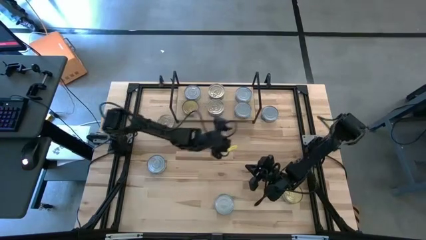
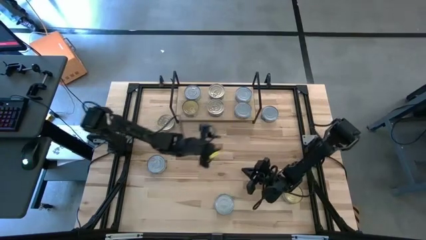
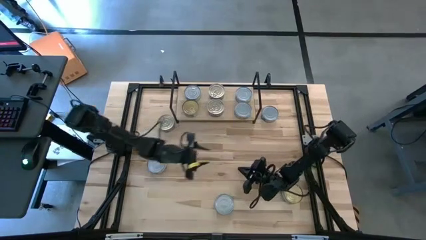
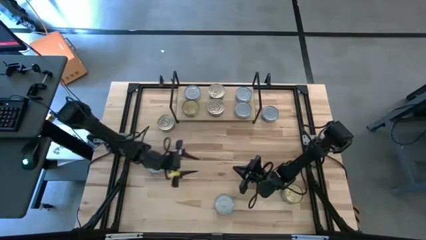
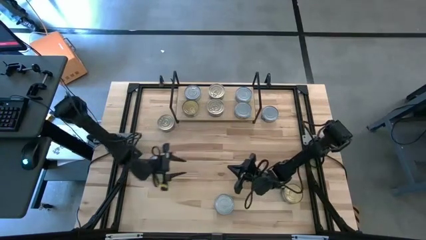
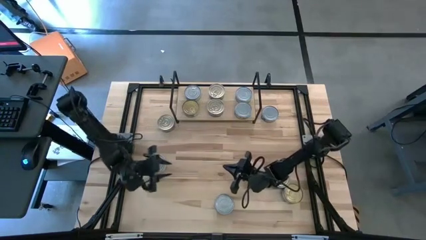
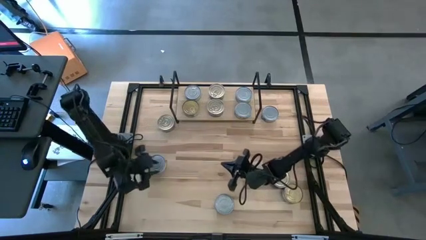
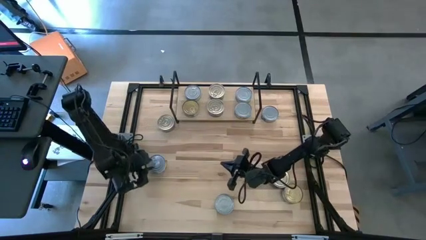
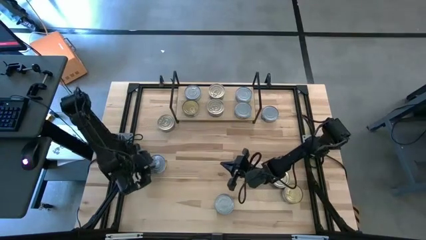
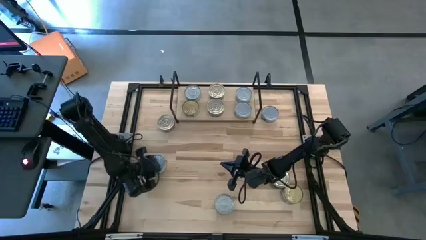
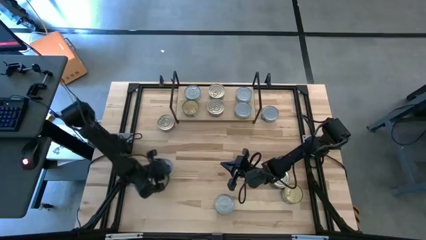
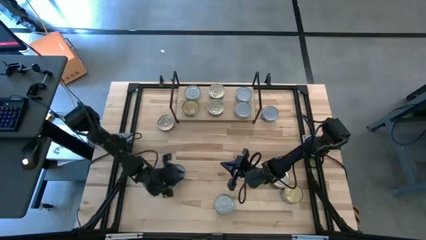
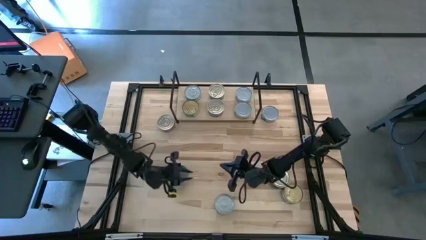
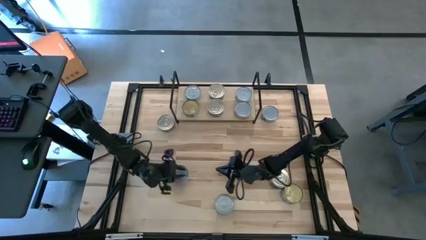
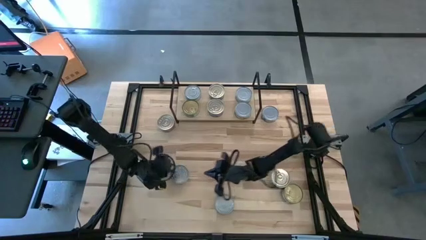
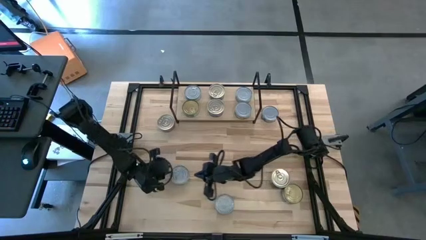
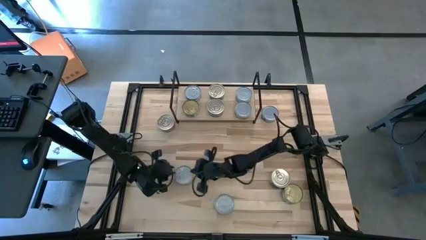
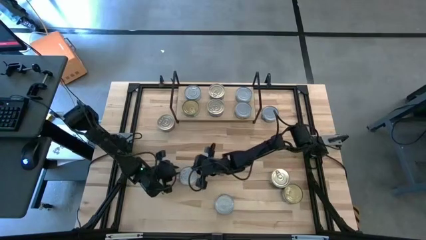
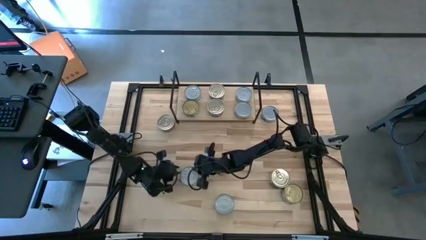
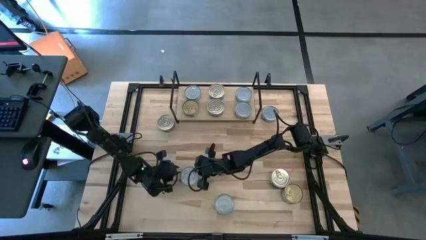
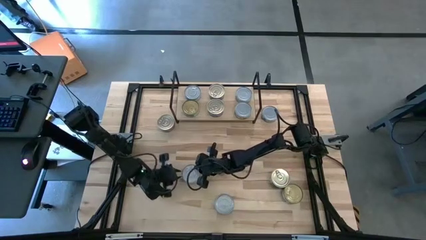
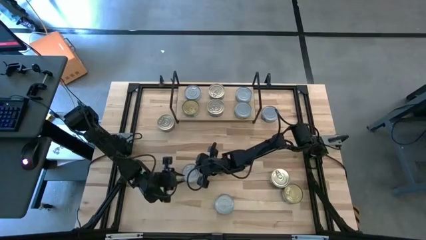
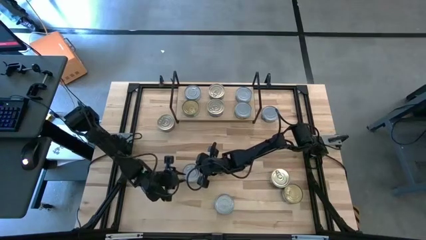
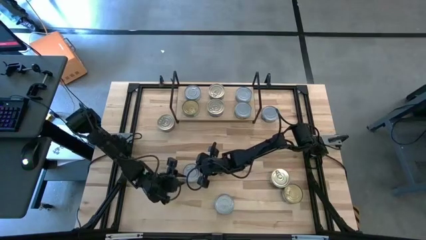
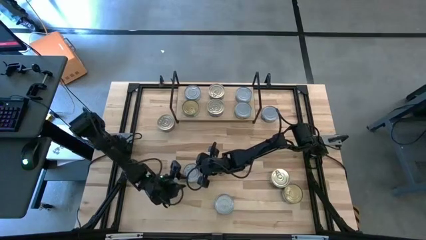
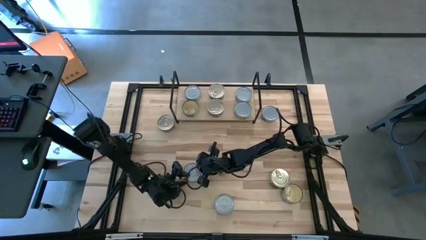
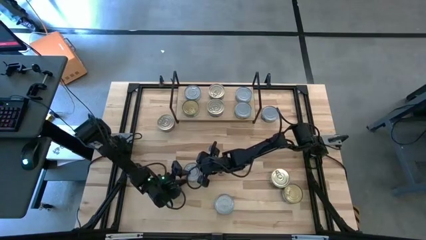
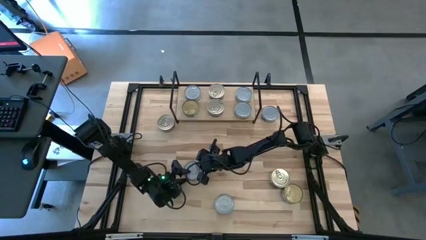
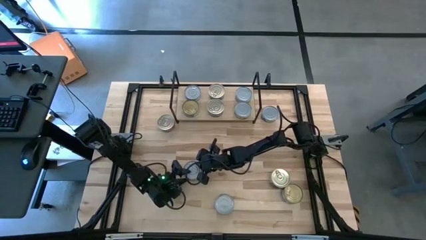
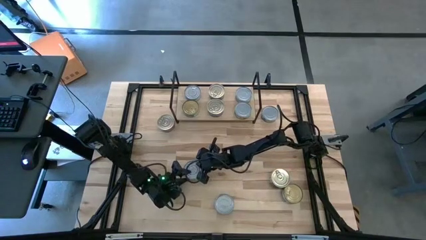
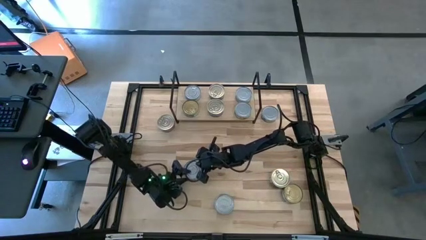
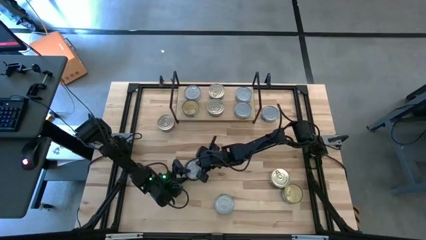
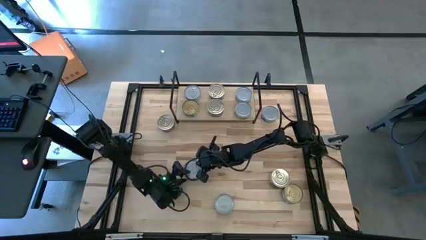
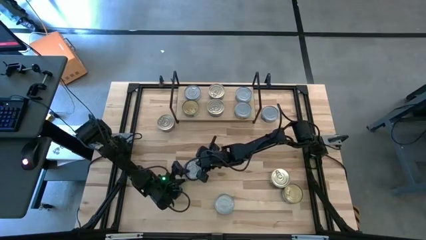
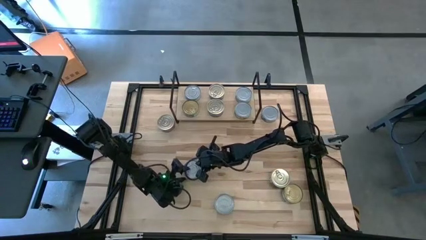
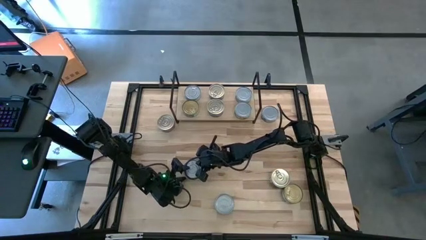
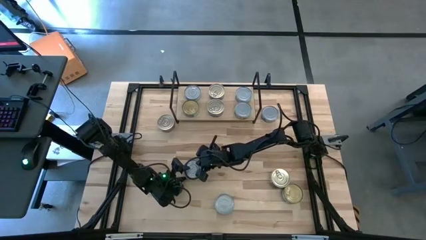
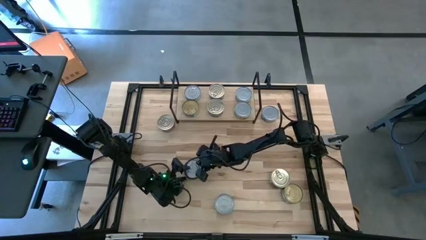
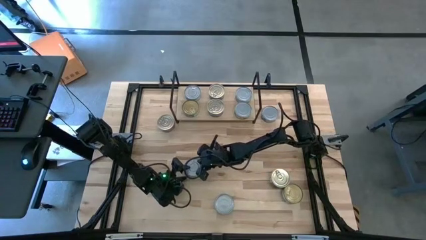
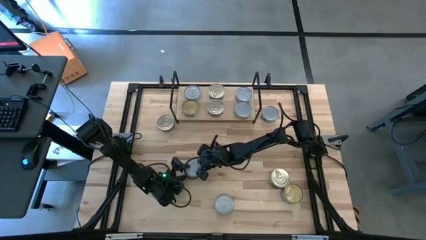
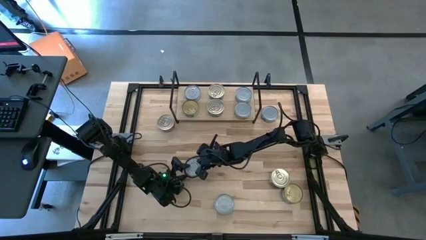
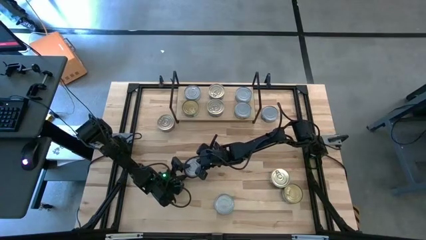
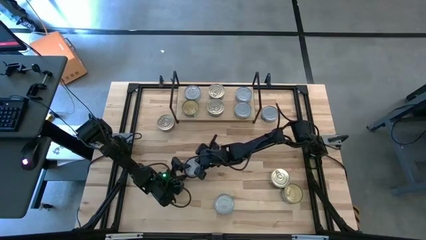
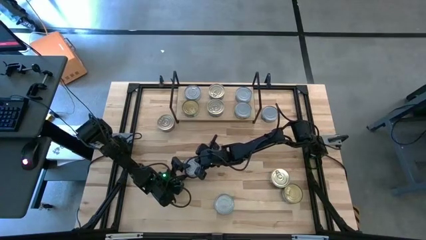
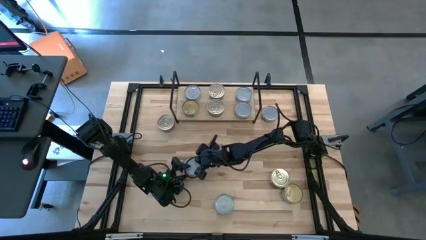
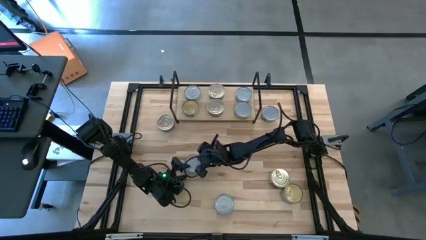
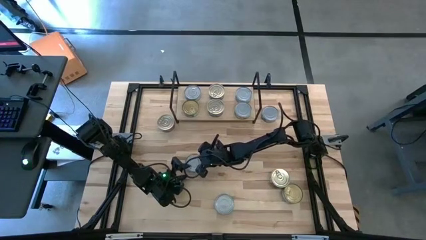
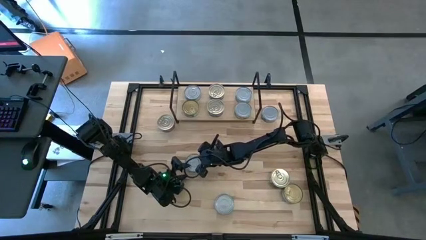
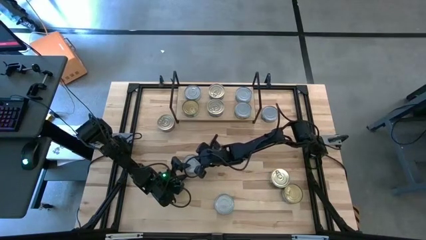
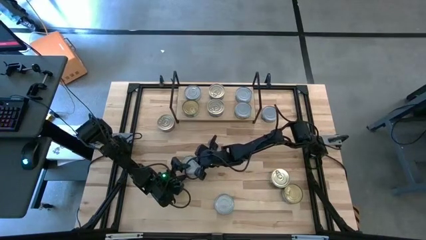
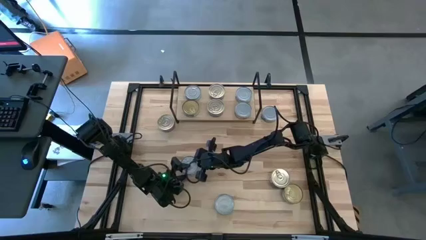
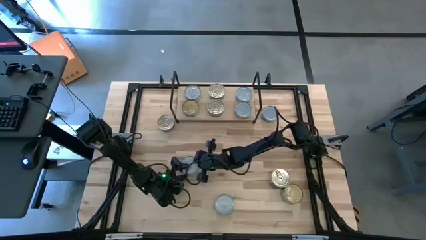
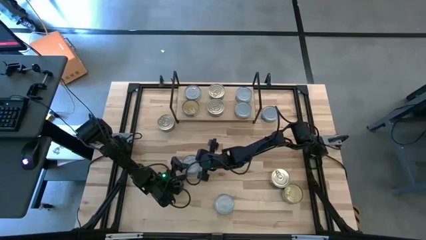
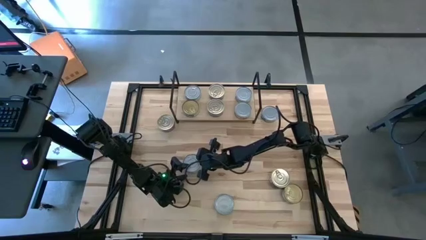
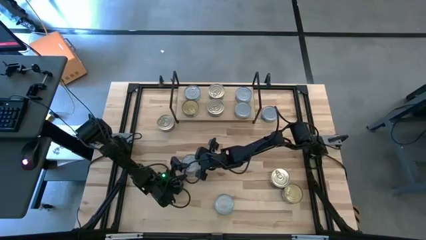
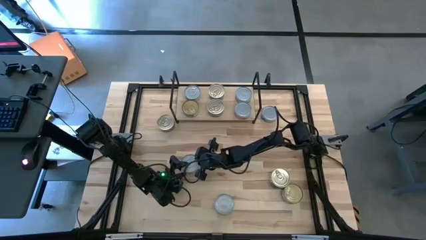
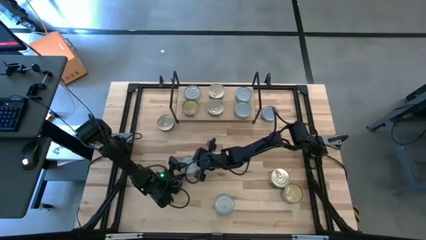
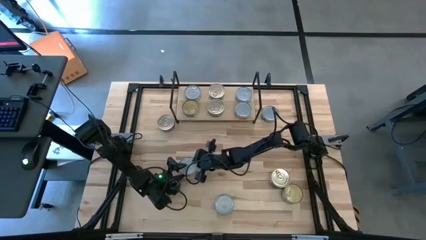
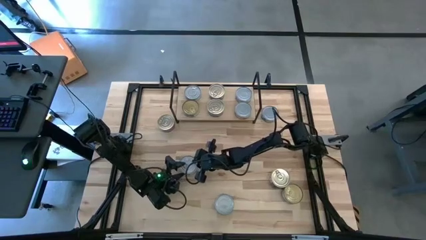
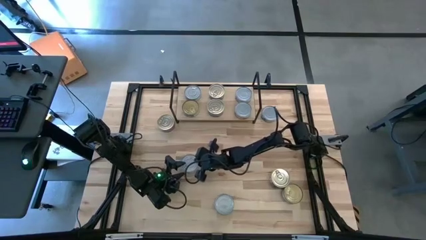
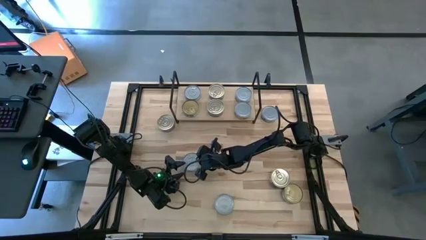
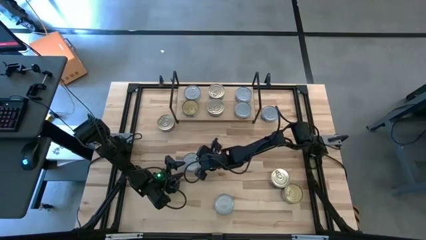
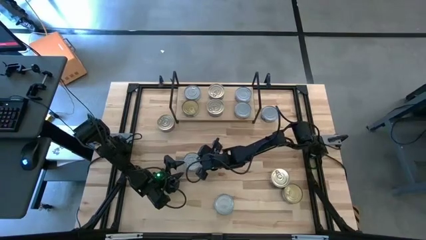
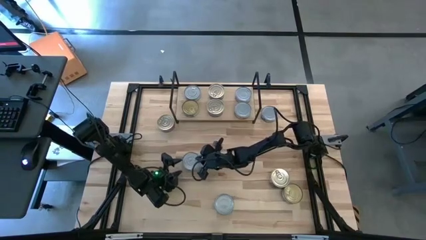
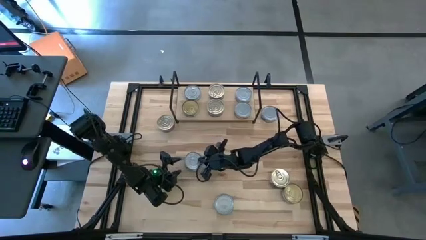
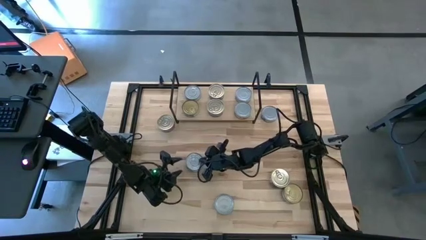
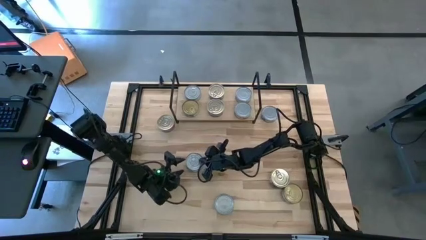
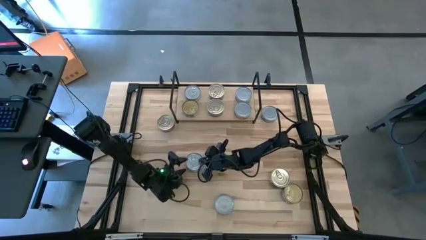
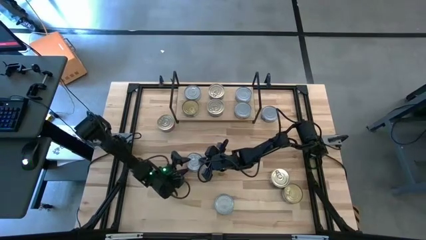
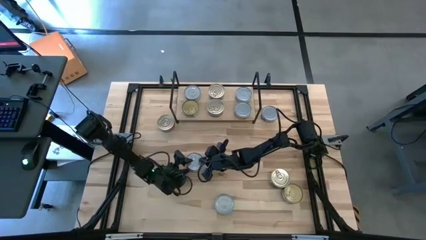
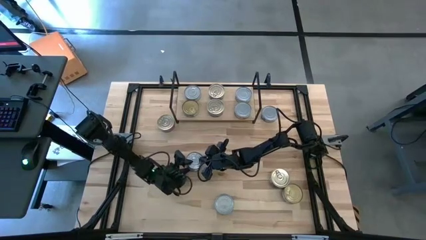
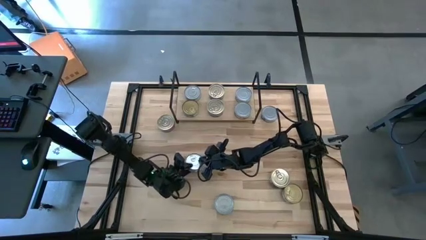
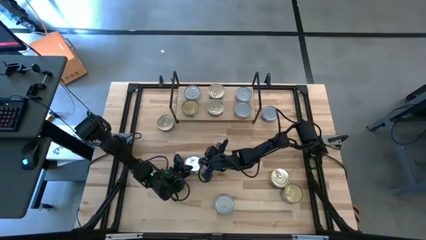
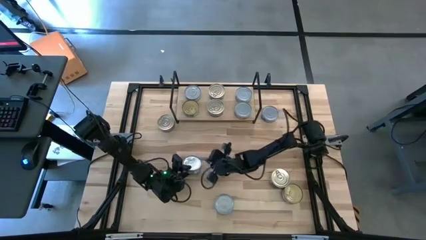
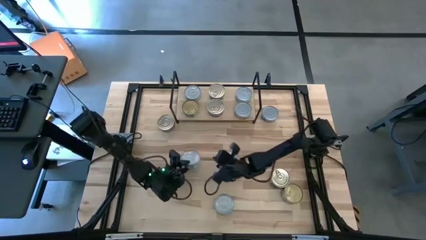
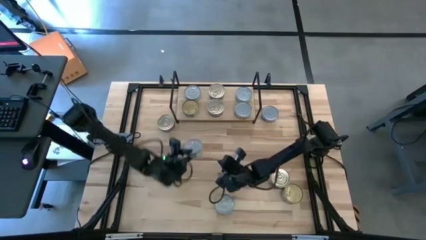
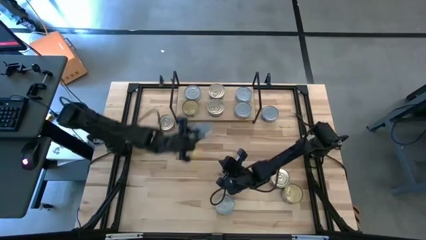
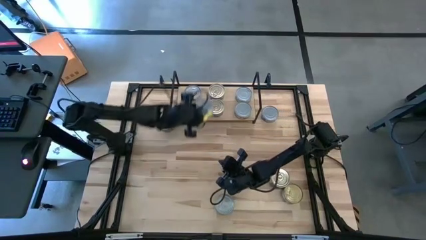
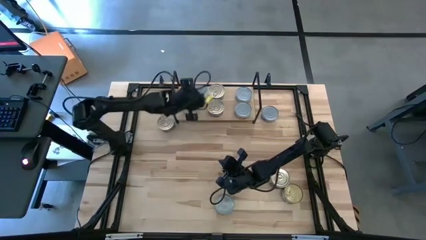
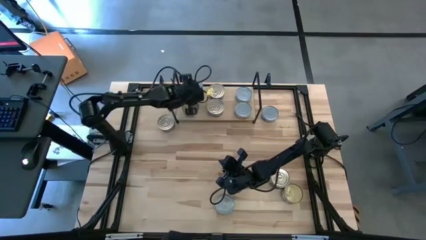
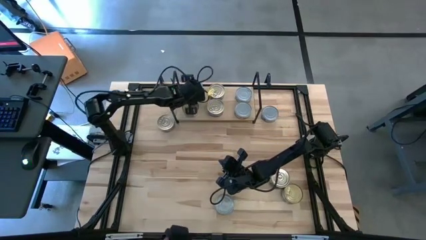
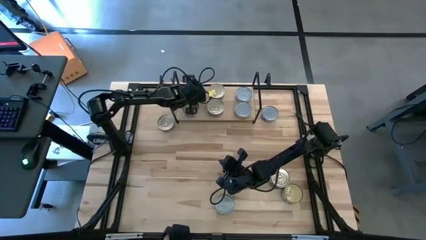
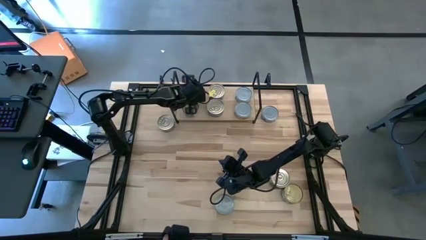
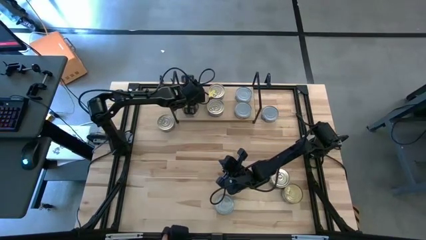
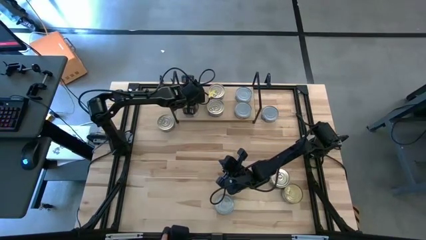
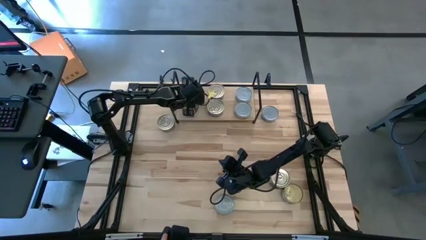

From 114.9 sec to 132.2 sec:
Task: Stack canned seafood by type on shelf
Stack the left green and blue tuna can on top of the green and blue tuna can on the back of the shelf
